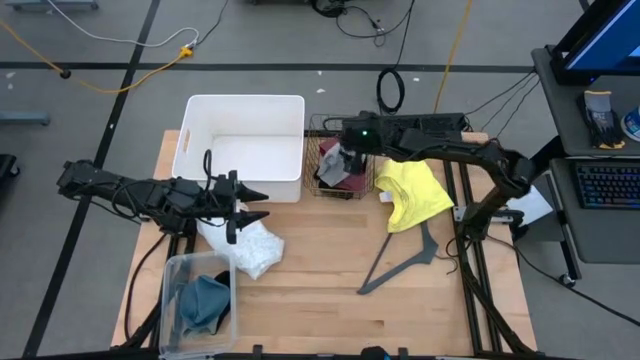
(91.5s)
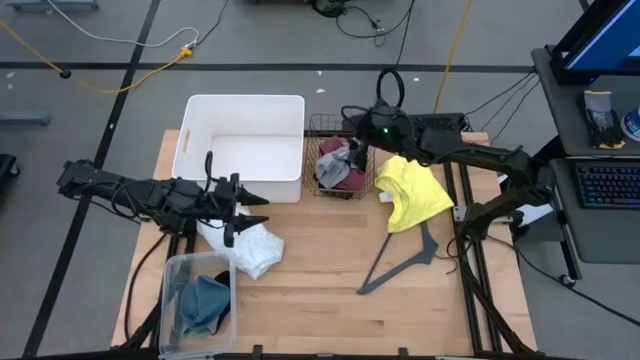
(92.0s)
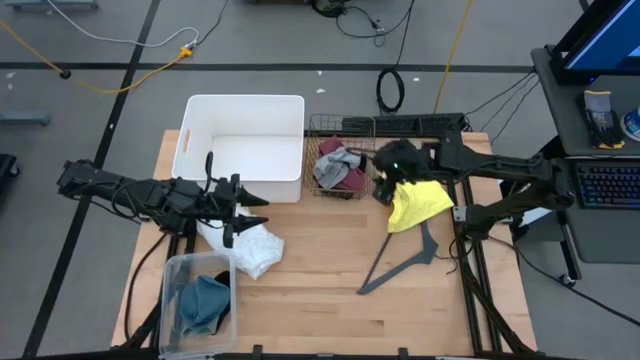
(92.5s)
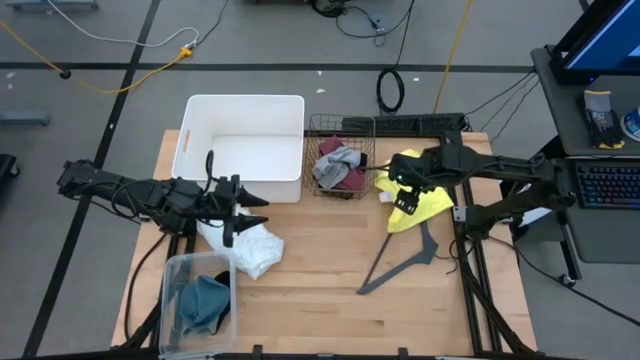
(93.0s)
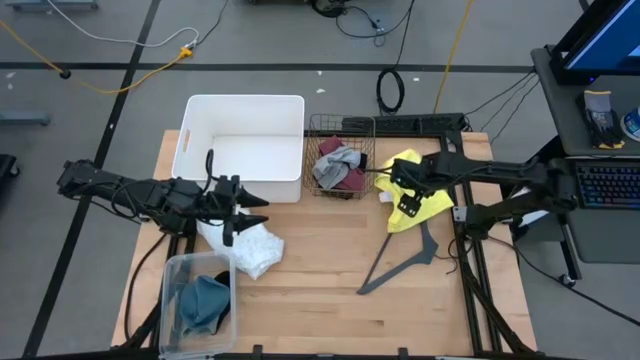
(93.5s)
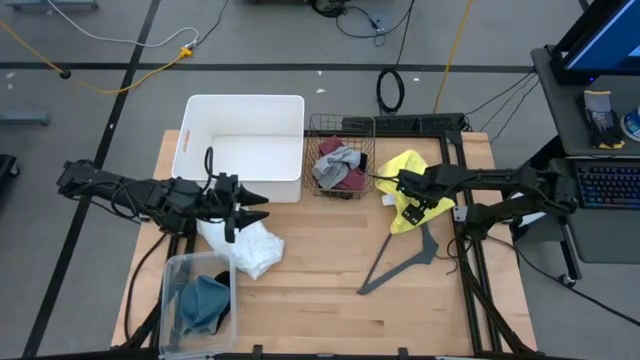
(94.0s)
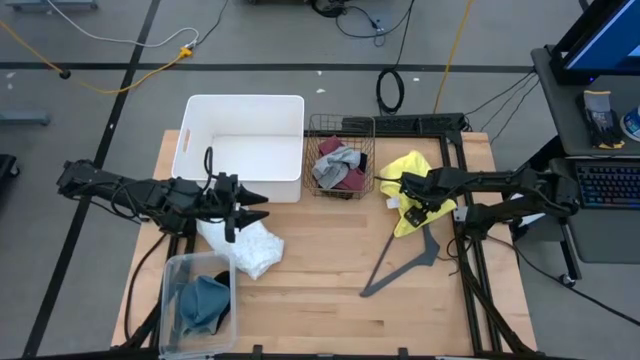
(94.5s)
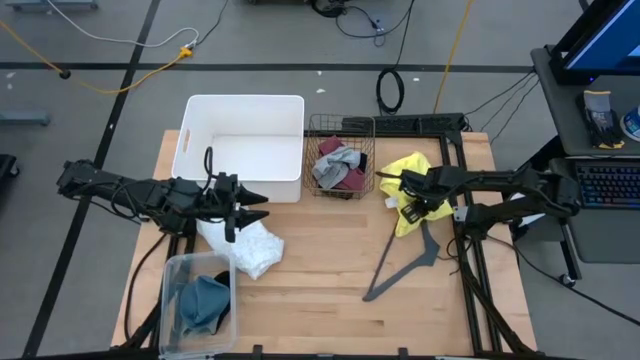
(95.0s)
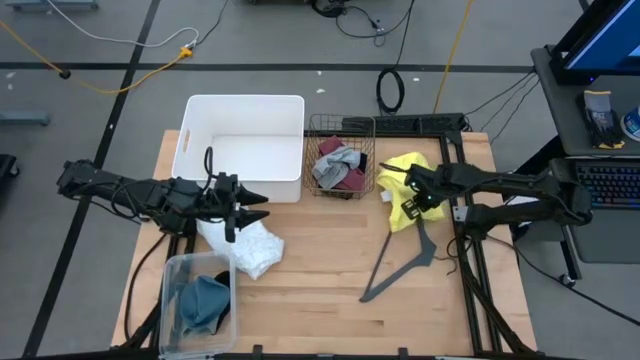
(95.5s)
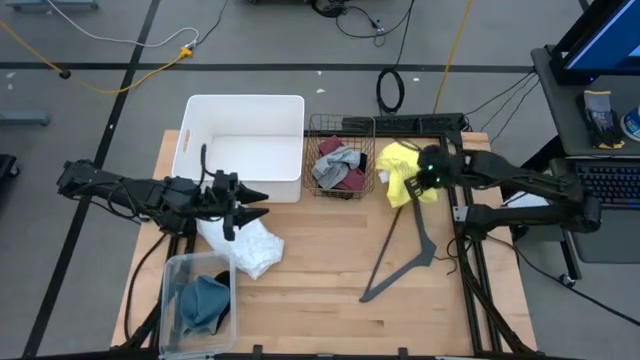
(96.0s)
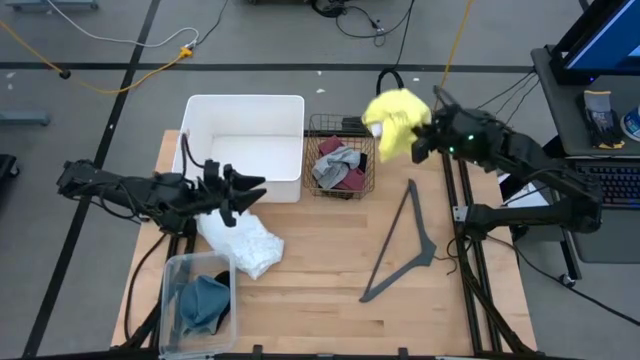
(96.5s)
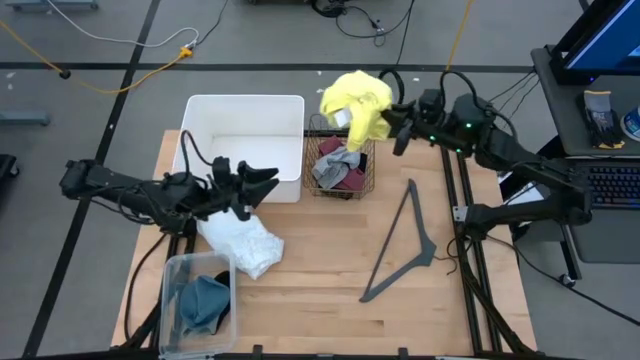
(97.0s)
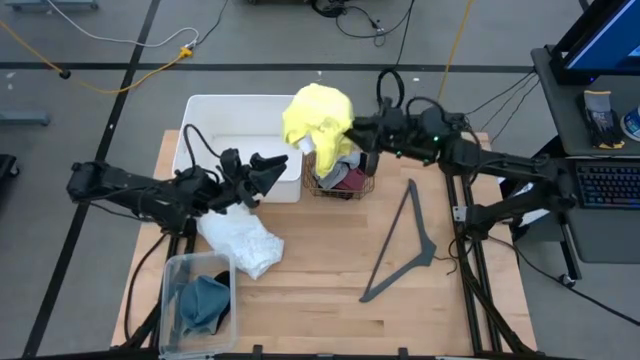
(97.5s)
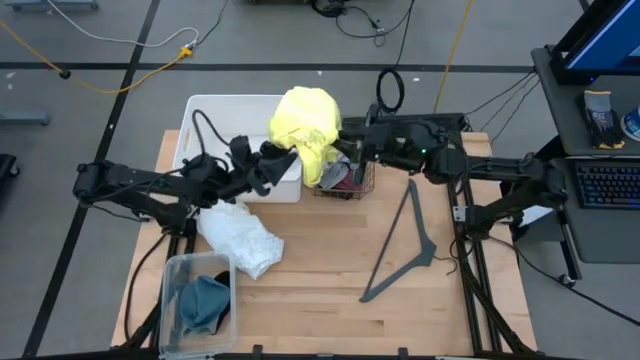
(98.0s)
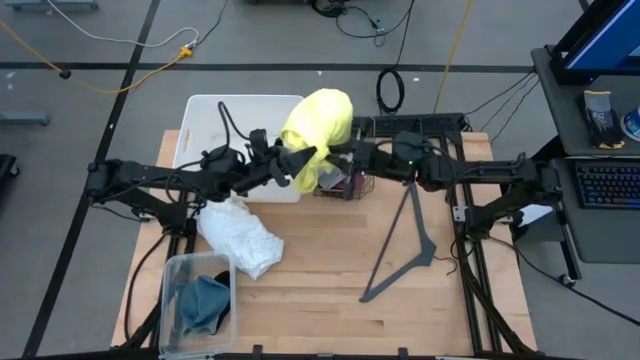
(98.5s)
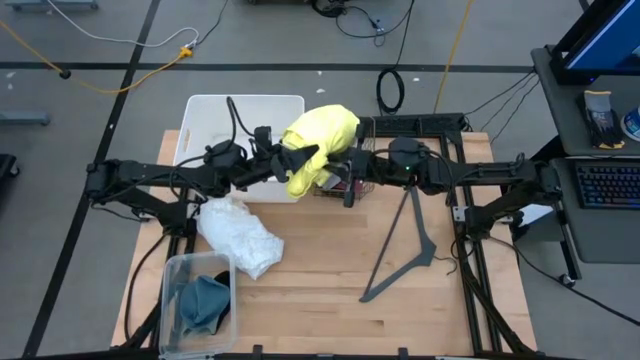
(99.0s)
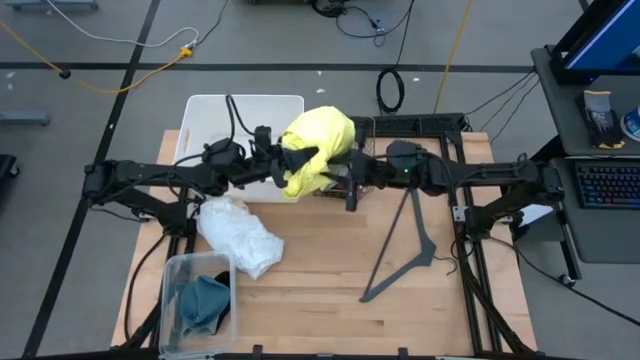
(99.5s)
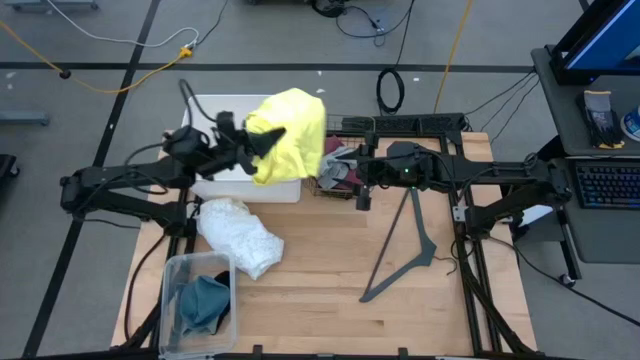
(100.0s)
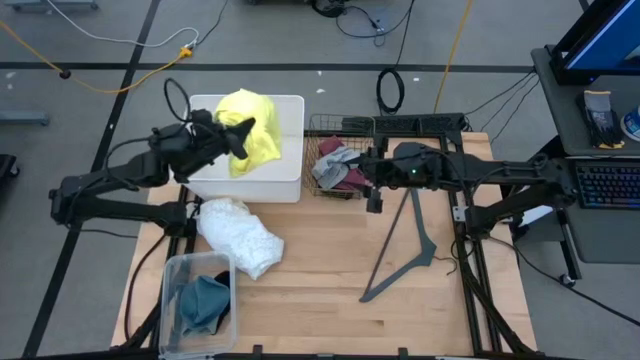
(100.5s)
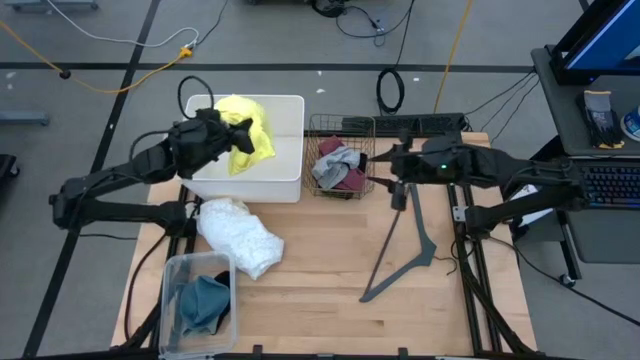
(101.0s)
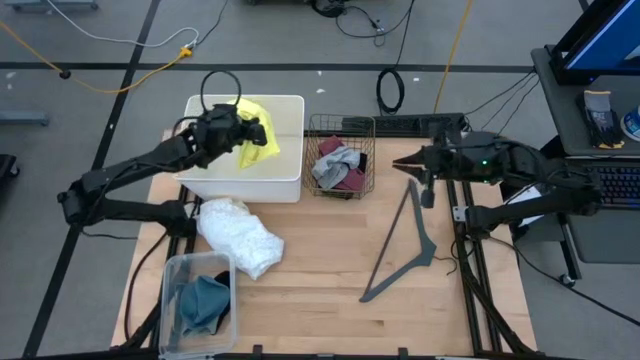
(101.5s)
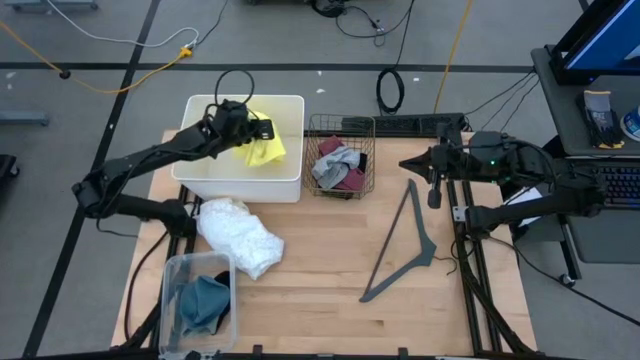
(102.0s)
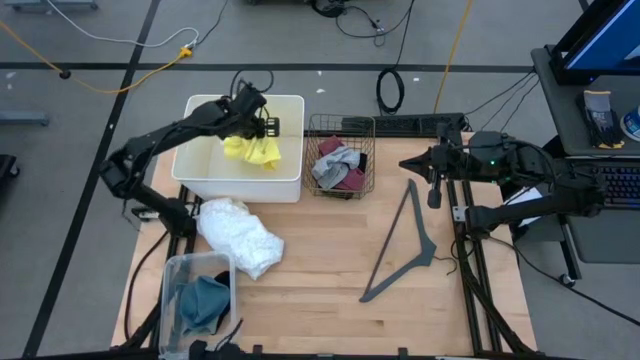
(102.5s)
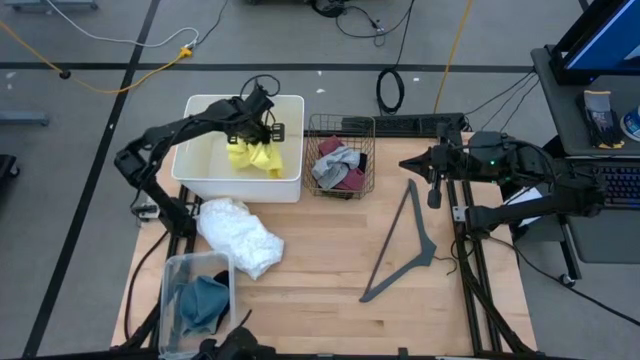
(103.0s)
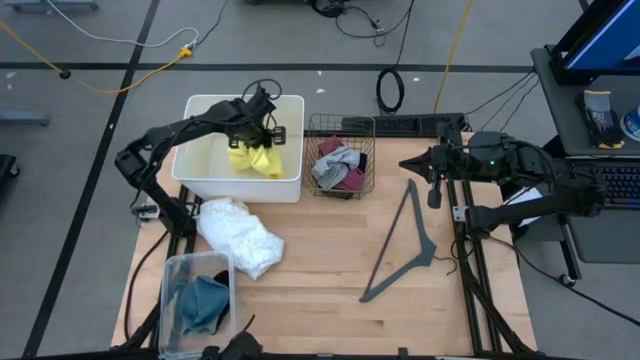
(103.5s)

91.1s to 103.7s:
Task: Pick & Place Cloths
Put the yellow shirt into the white bin

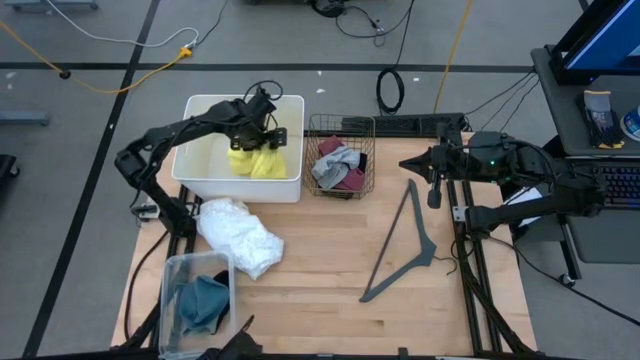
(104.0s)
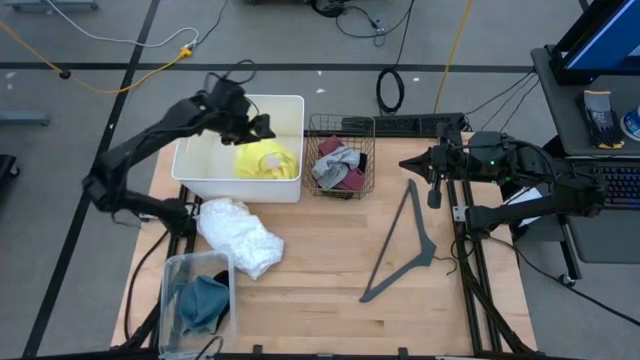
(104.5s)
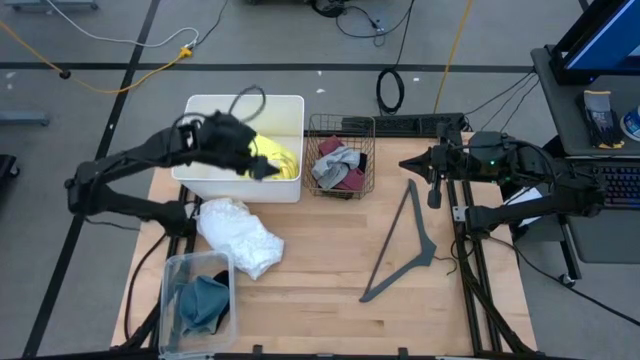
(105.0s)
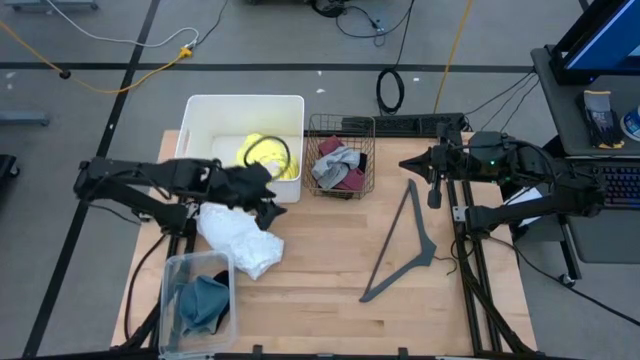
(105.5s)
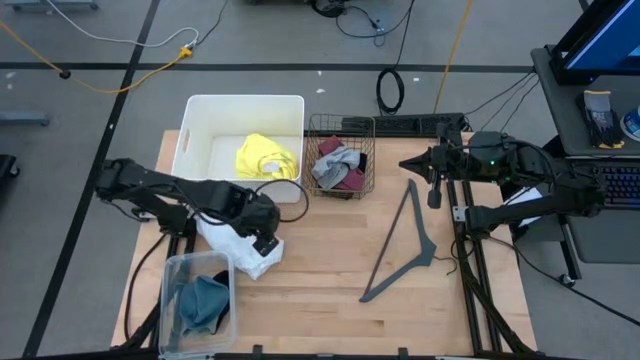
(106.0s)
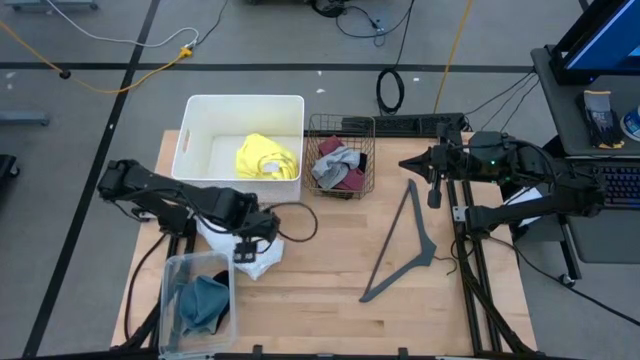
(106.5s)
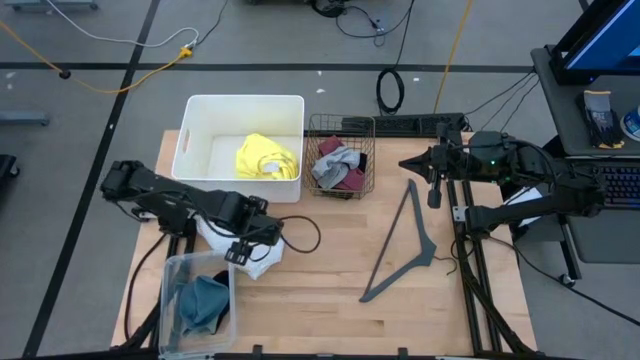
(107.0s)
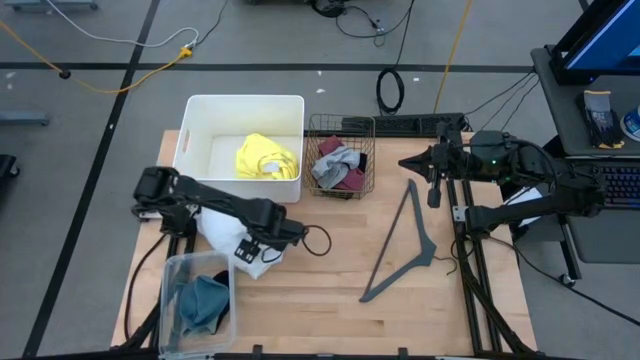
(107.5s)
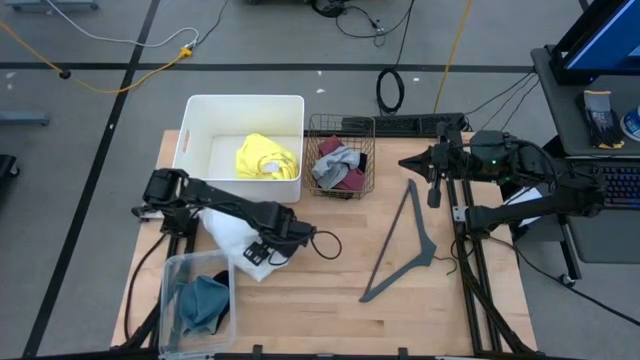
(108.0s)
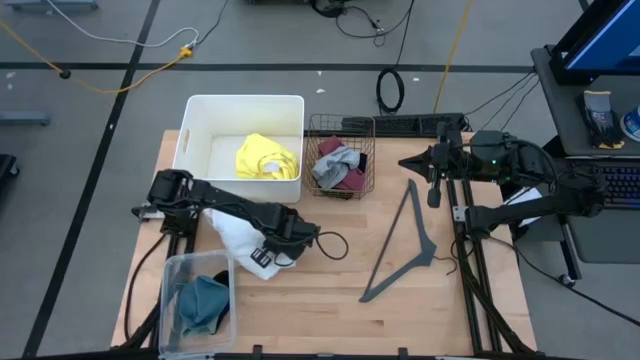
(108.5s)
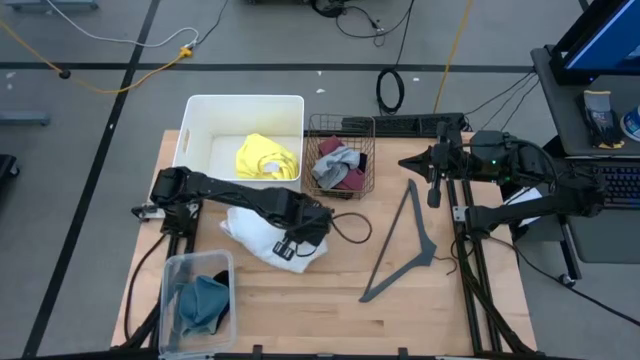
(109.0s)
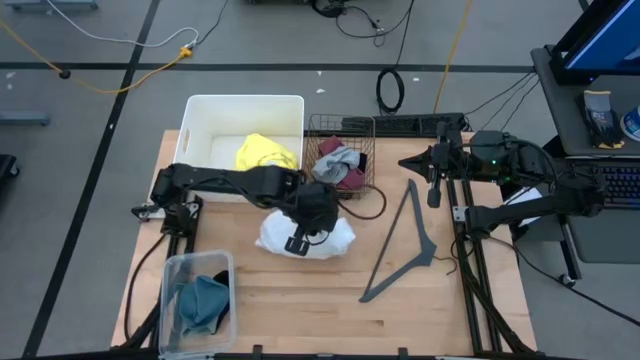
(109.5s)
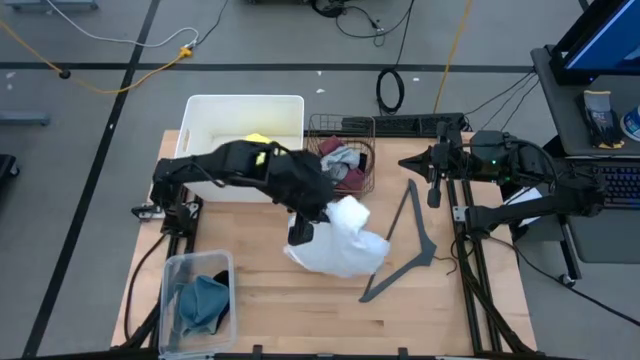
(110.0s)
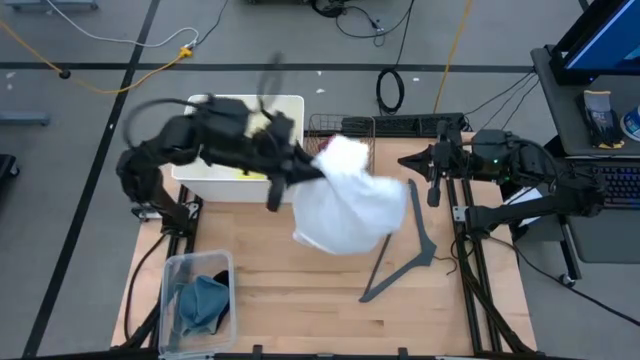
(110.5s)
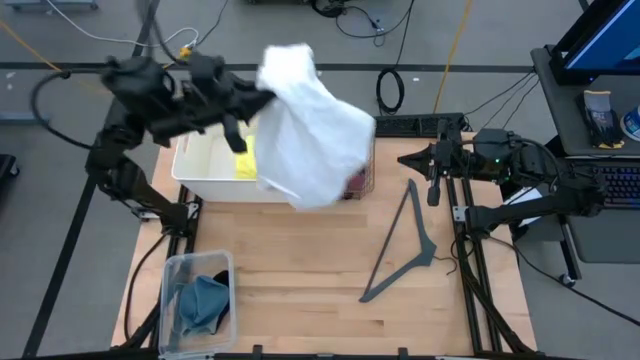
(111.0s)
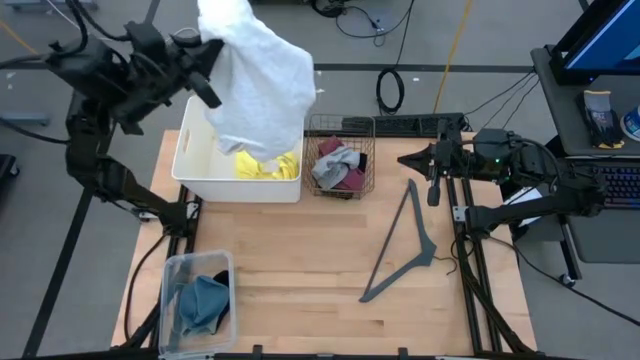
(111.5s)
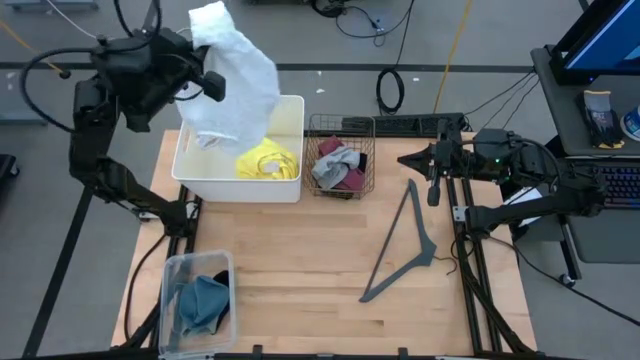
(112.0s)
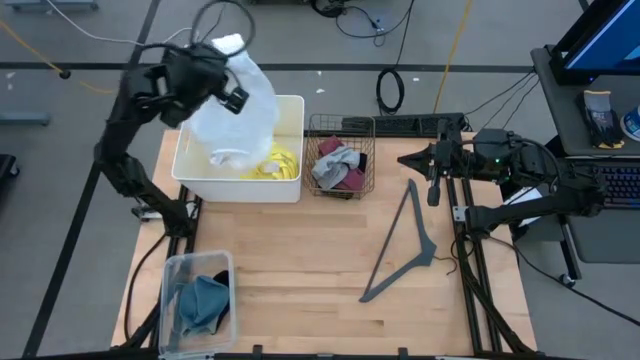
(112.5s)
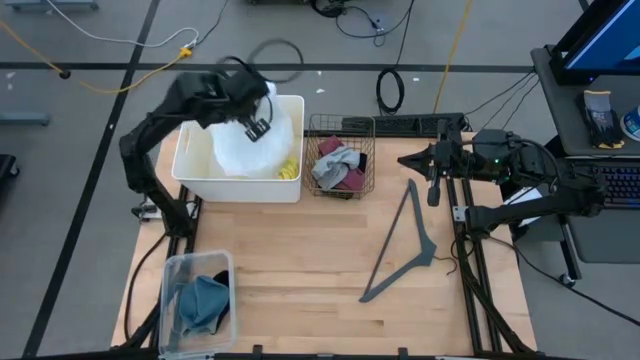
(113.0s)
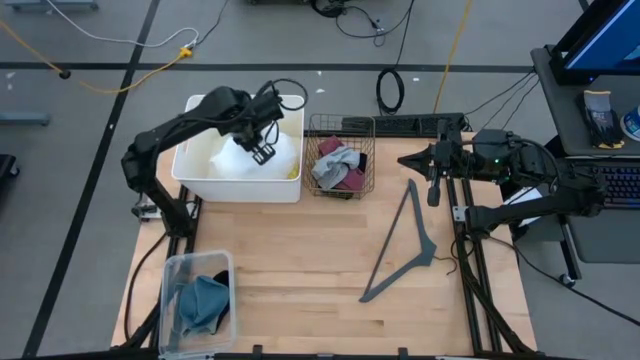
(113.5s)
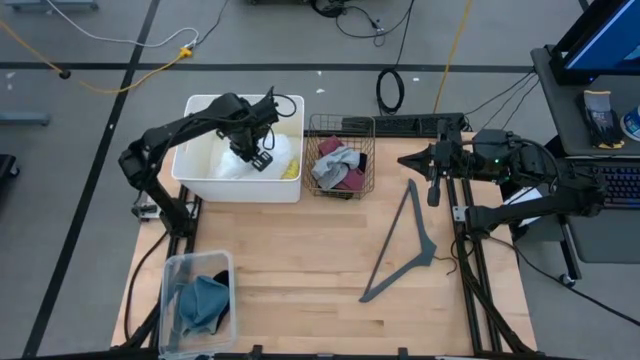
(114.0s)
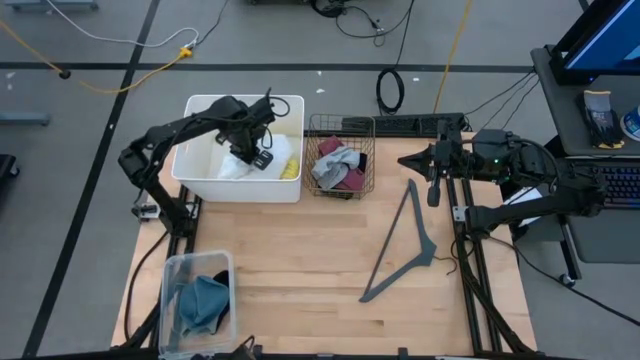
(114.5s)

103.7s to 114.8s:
Put the white dress into the white bin
